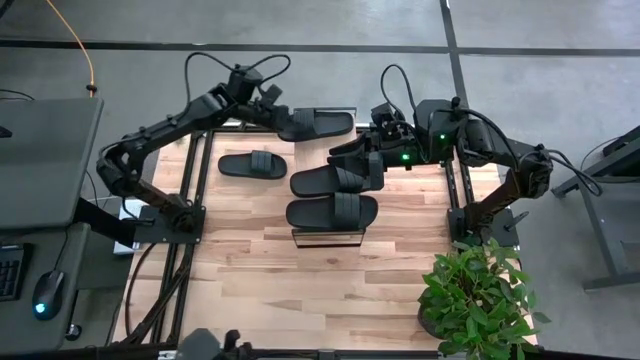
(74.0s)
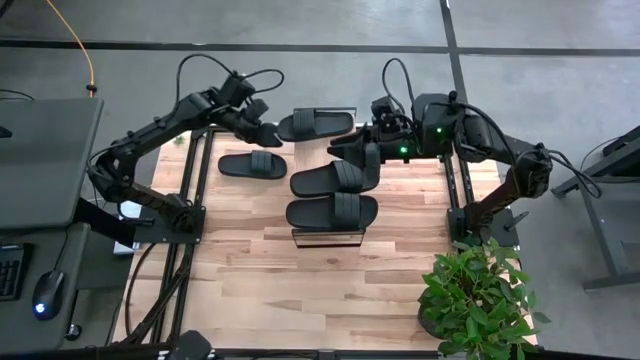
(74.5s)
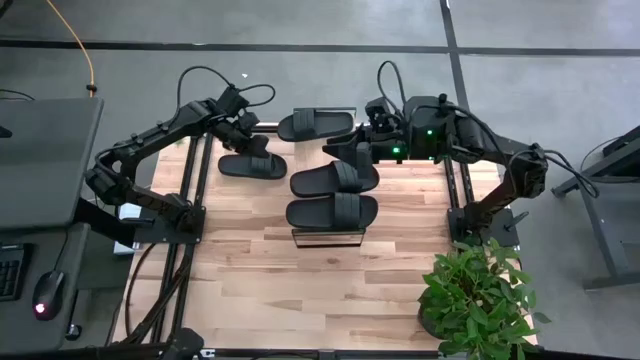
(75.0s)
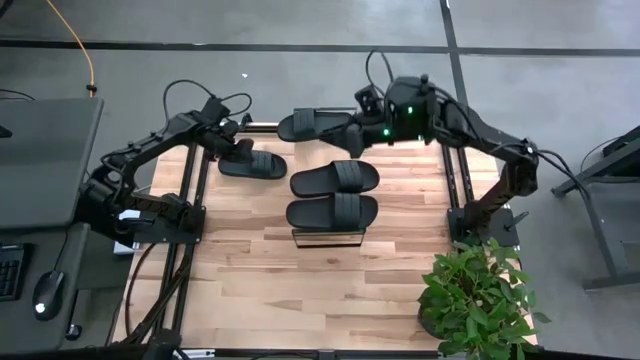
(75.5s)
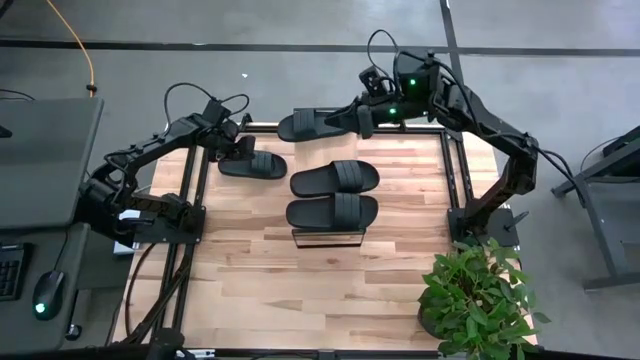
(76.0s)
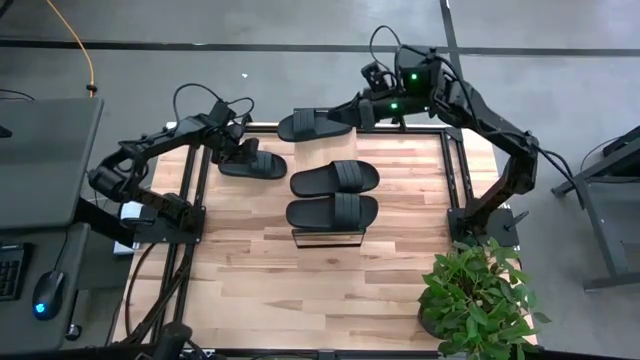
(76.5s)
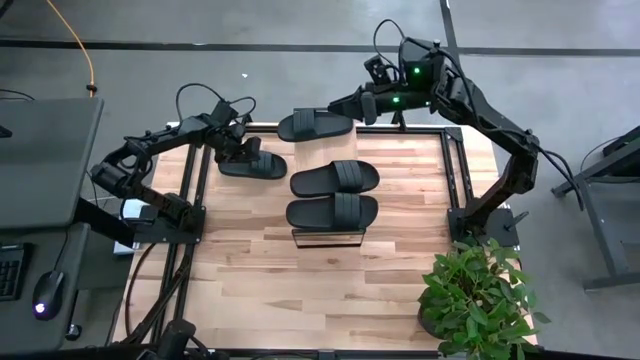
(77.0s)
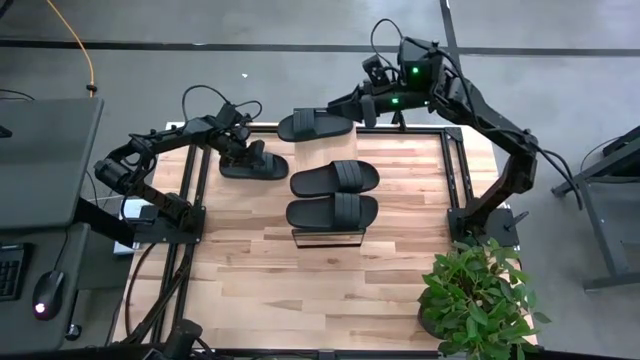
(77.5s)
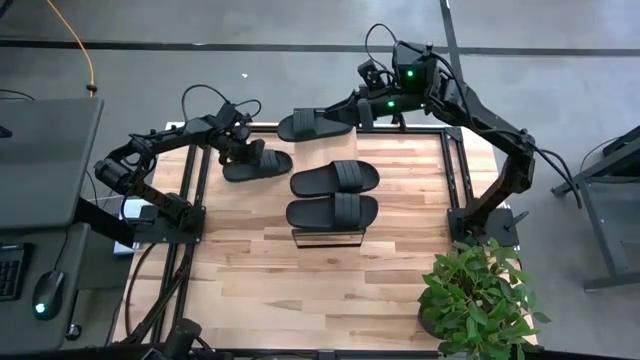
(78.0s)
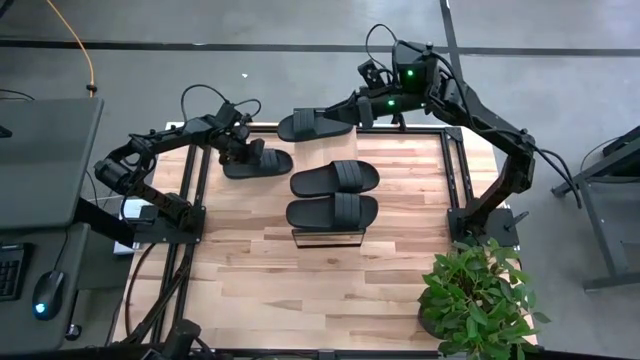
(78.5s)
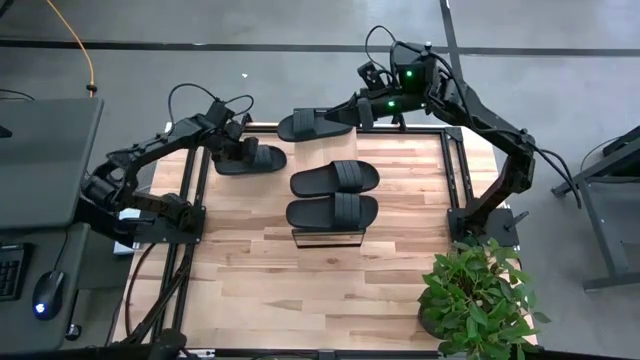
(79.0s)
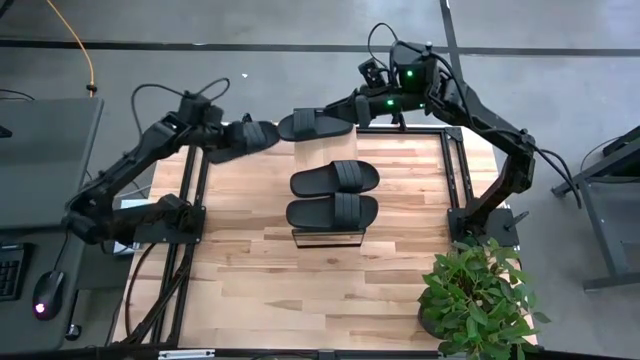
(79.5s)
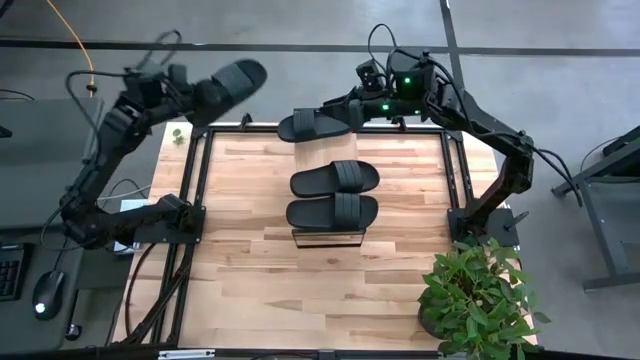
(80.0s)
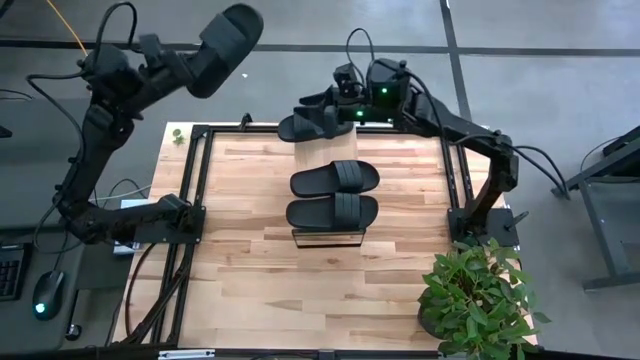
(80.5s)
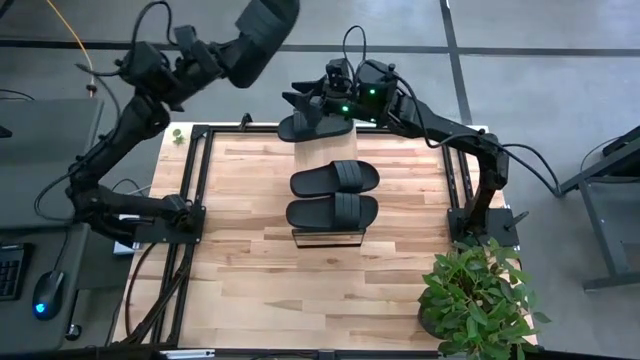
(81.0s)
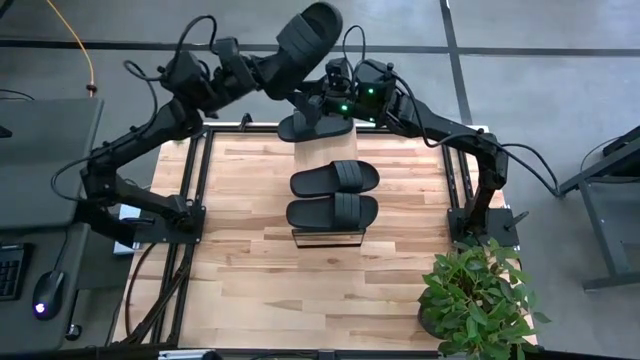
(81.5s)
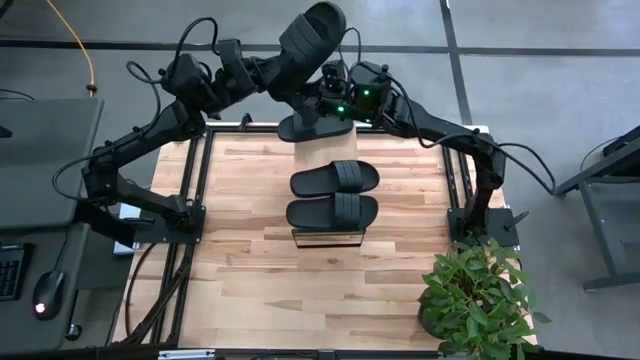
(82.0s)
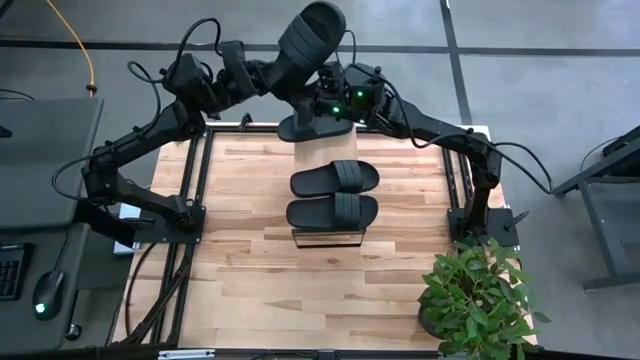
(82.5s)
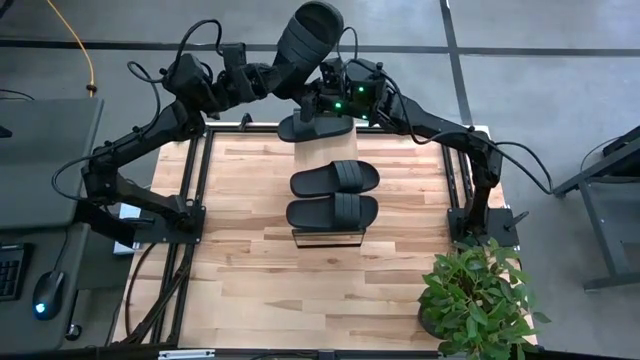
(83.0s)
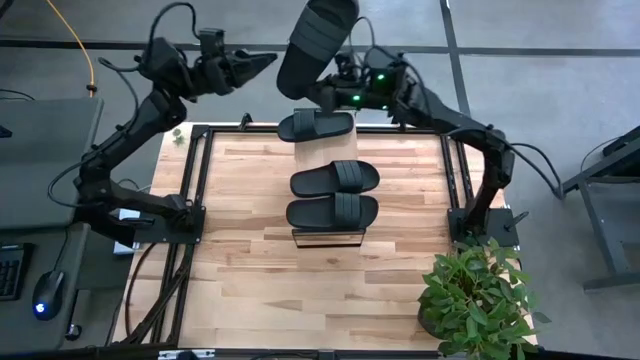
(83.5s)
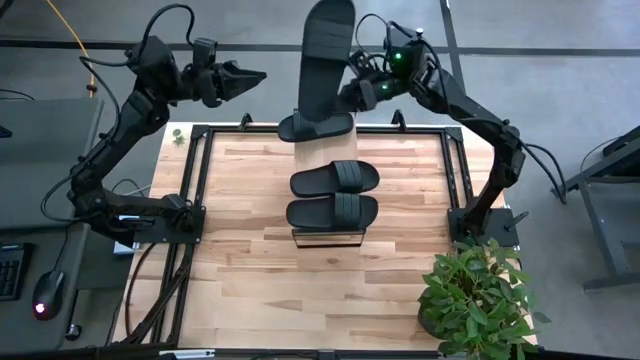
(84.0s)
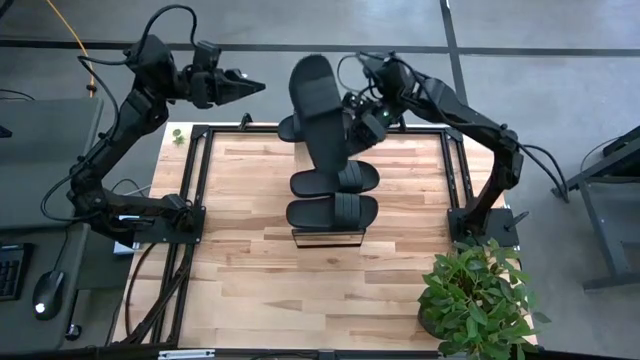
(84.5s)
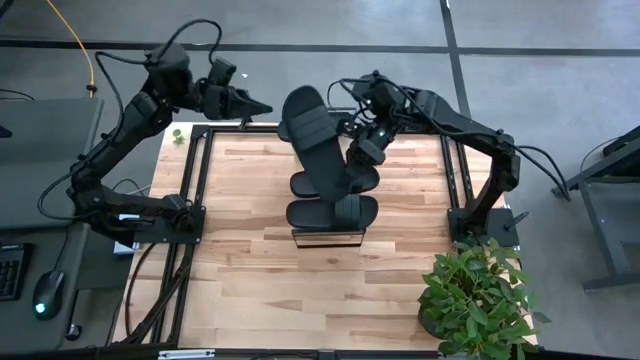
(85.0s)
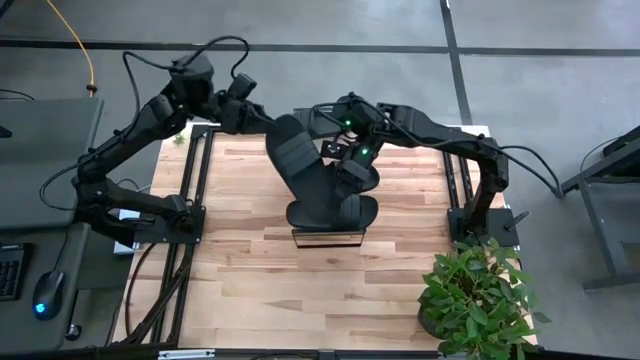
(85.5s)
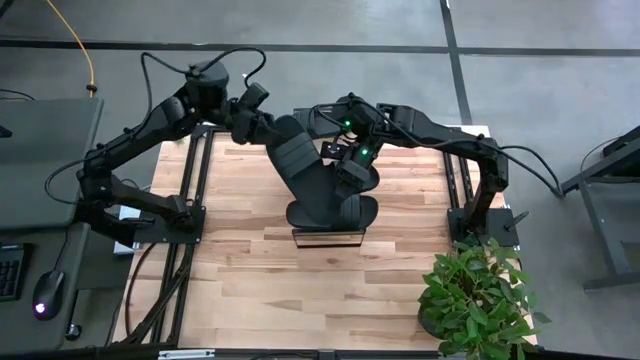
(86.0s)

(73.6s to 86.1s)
Task: Pick and place slides into the shelf
Put the black slide on the shelf

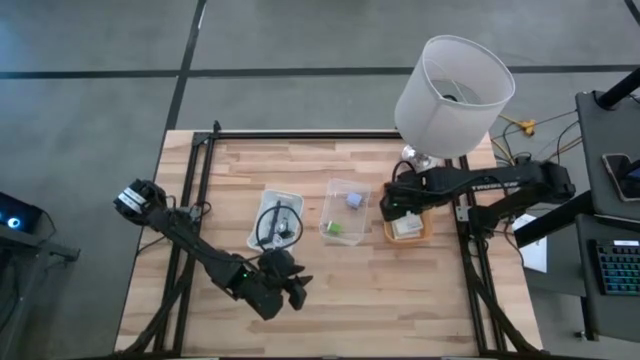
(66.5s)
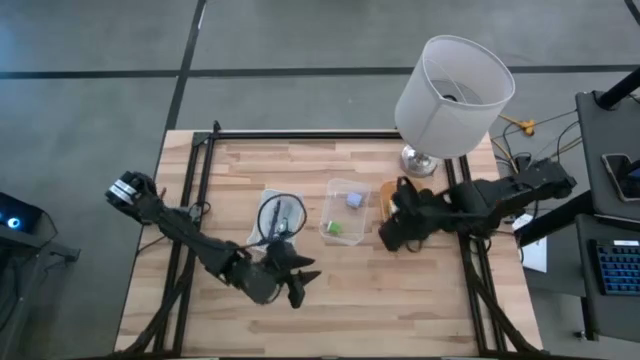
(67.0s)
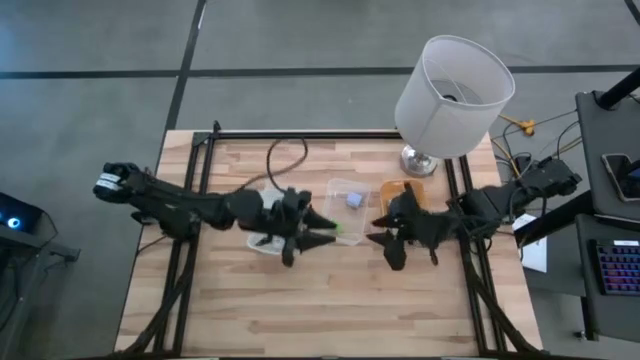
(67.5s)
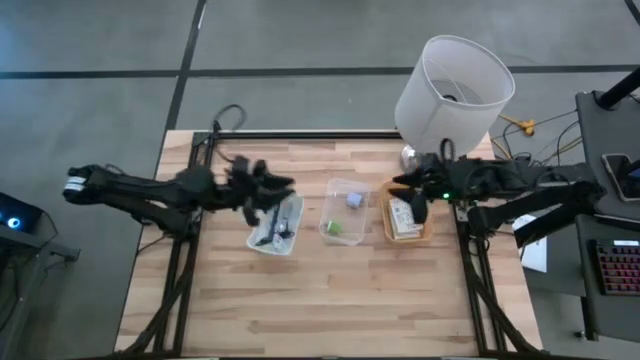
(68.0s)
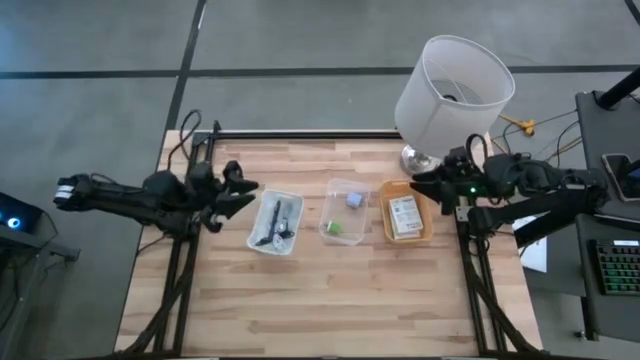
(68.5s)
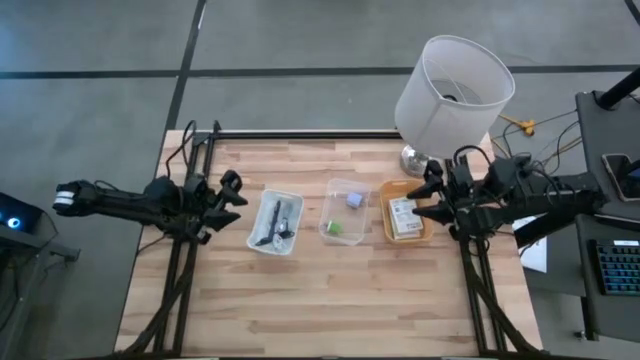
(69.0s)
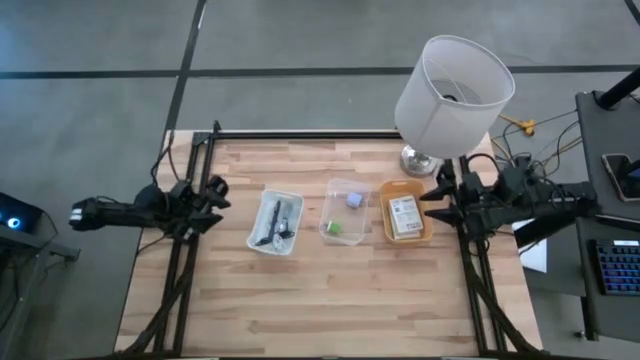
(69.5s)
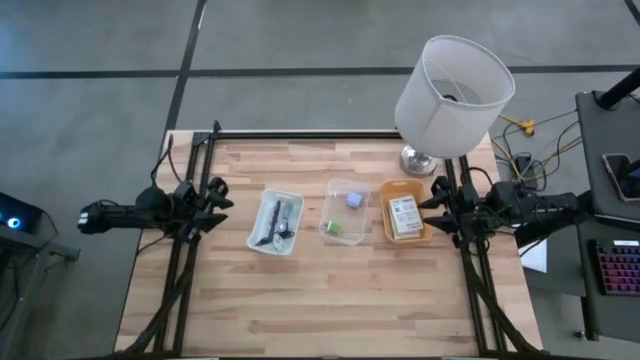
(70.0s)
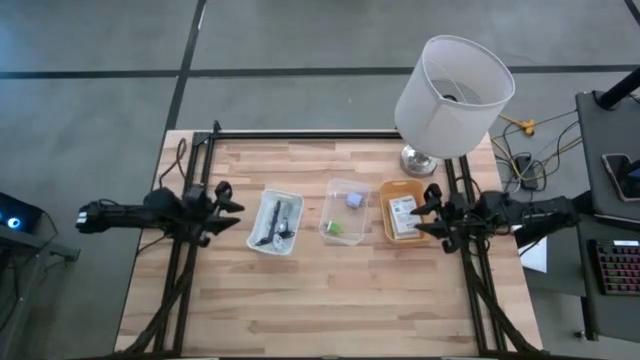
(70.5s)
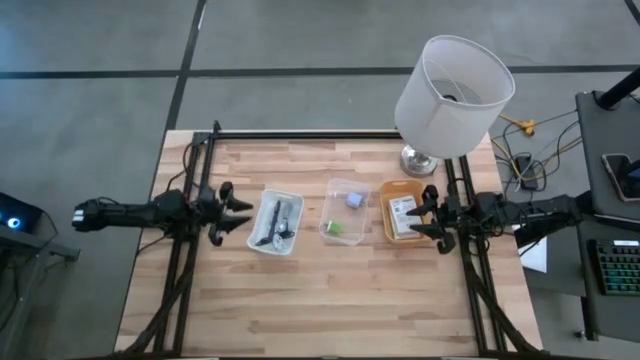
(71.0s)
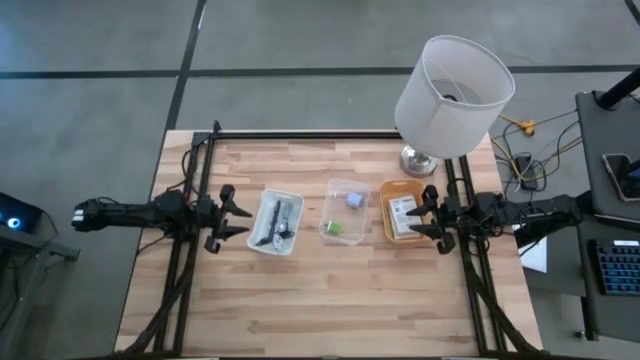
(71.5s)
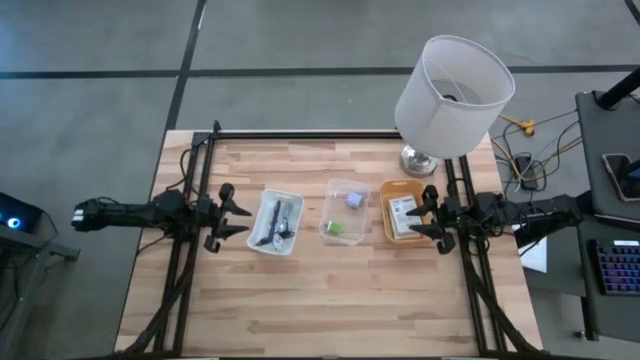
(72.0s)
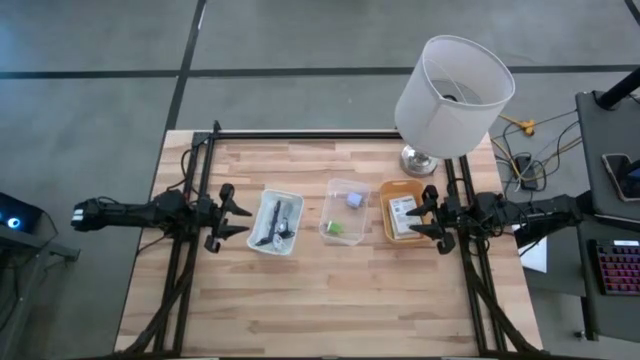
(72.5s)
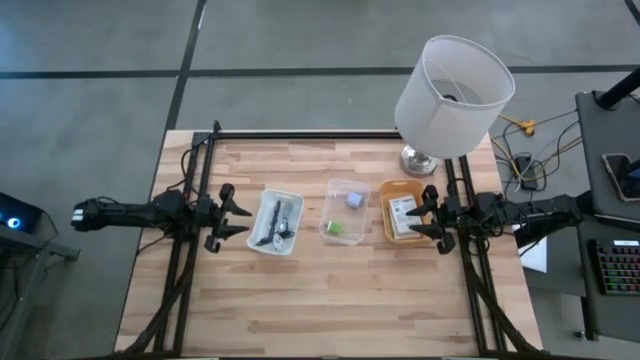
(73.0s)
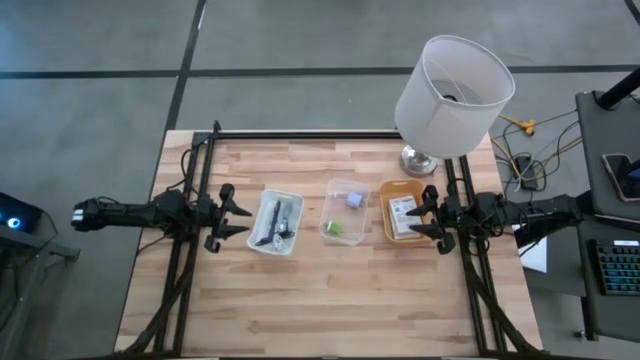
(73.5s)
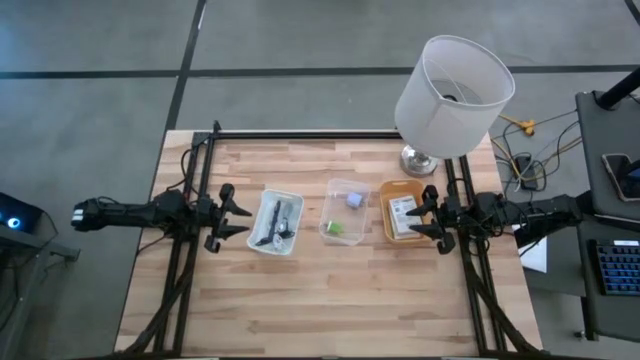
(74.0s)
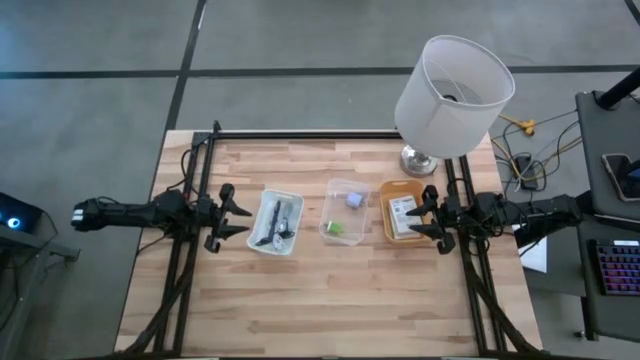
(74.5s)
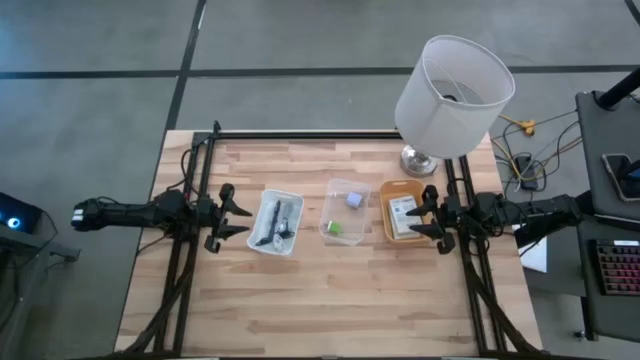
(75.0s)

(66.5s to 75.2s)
Task: Pick and place items into bin
Return to Home Position
